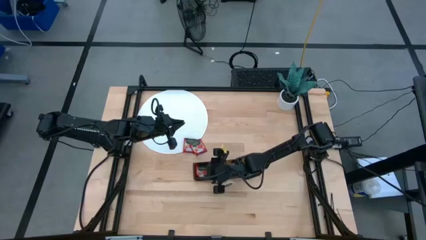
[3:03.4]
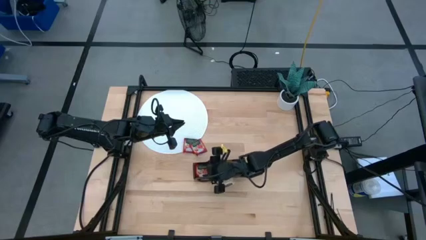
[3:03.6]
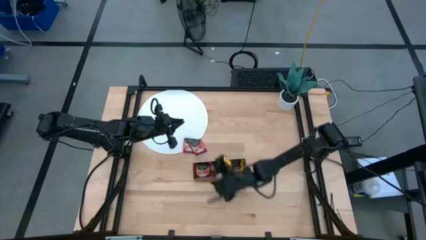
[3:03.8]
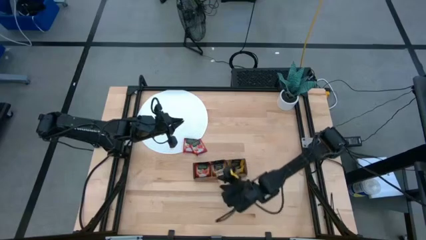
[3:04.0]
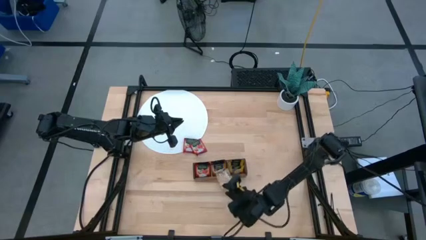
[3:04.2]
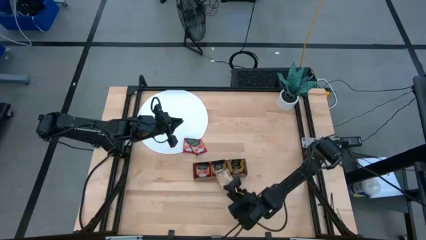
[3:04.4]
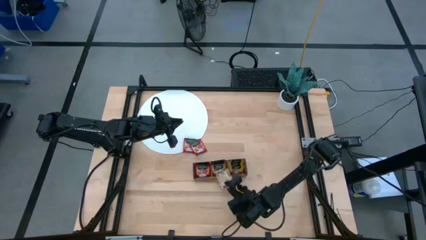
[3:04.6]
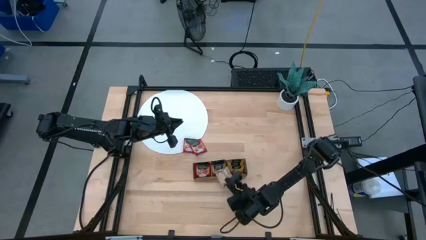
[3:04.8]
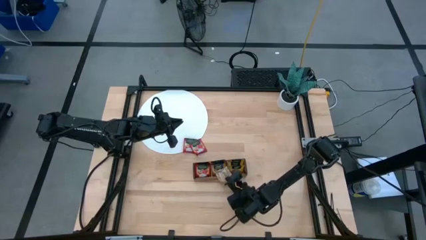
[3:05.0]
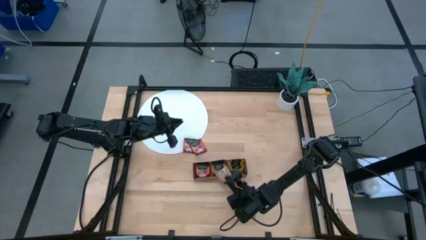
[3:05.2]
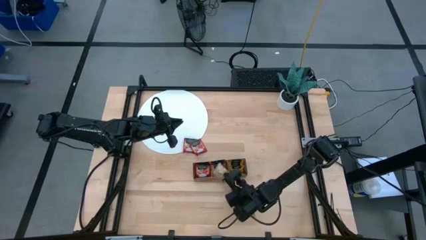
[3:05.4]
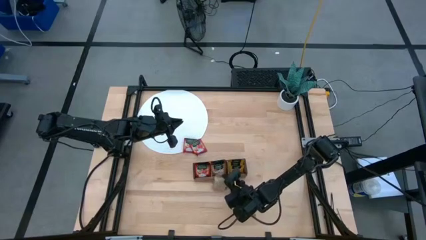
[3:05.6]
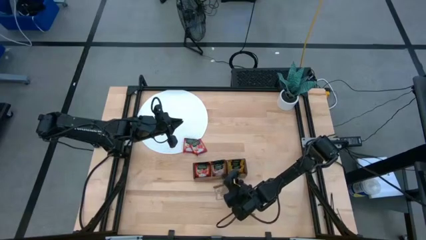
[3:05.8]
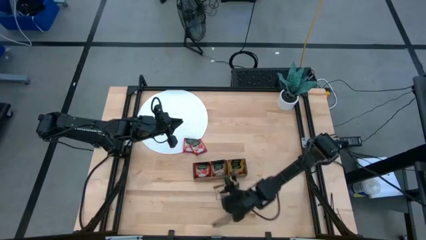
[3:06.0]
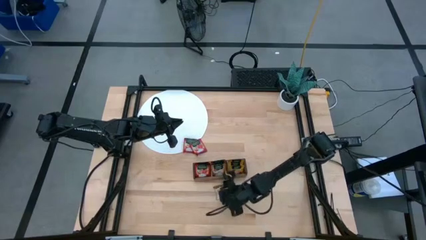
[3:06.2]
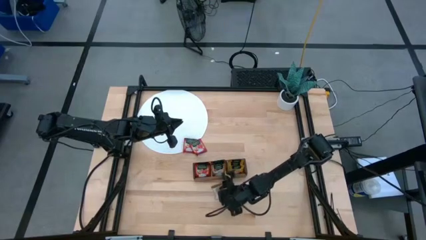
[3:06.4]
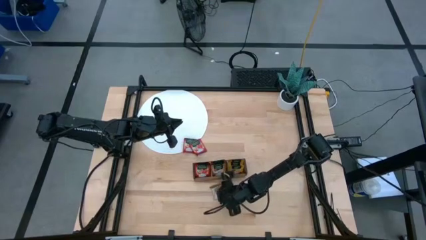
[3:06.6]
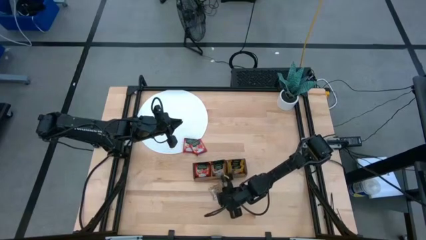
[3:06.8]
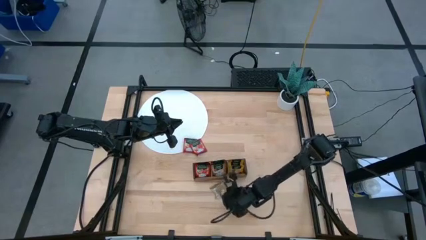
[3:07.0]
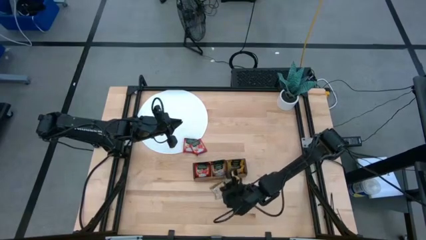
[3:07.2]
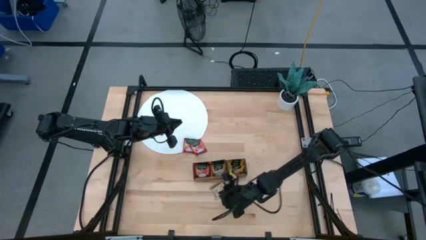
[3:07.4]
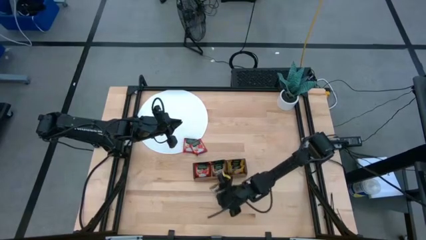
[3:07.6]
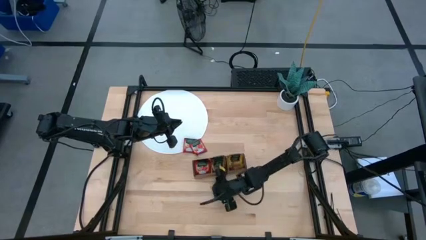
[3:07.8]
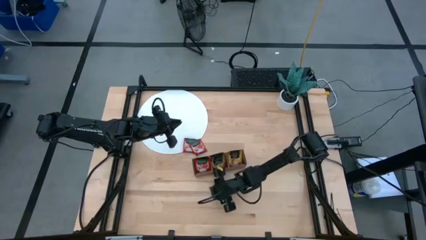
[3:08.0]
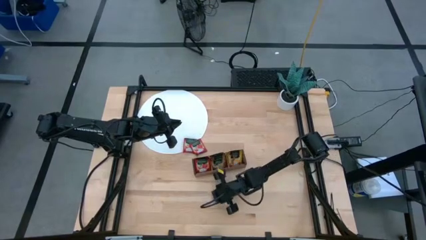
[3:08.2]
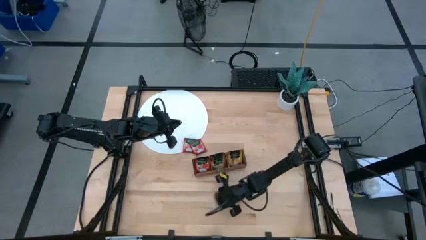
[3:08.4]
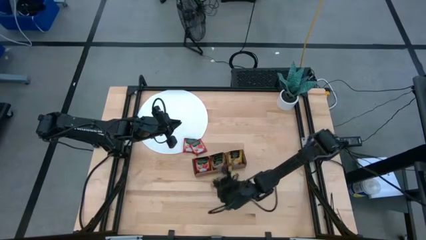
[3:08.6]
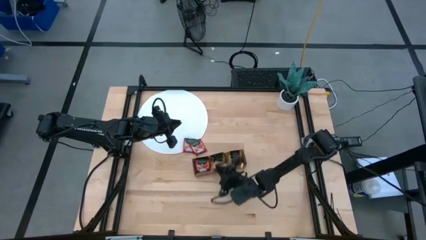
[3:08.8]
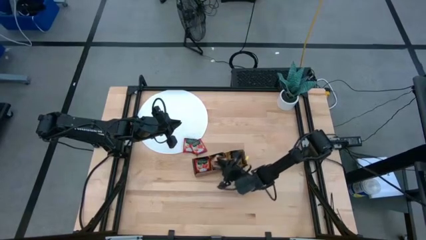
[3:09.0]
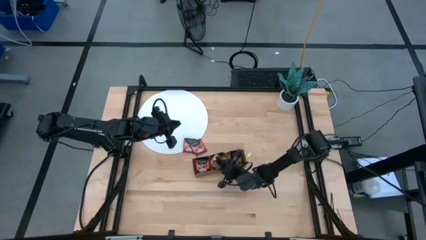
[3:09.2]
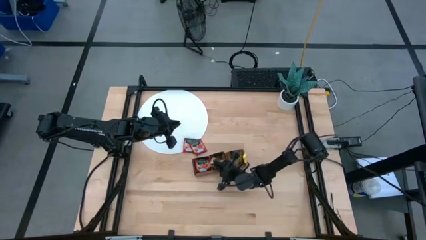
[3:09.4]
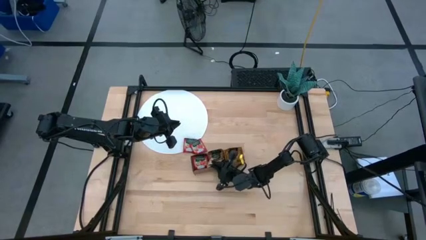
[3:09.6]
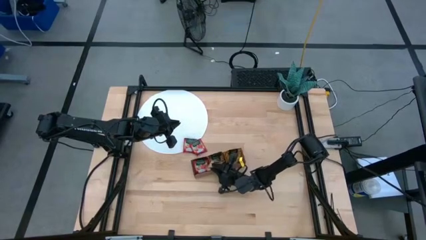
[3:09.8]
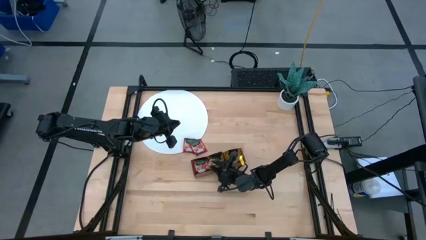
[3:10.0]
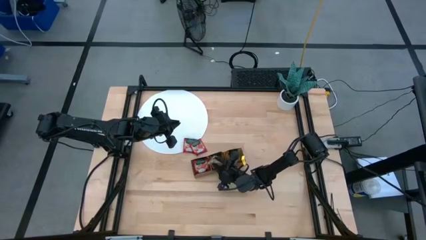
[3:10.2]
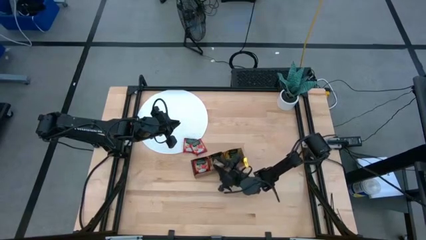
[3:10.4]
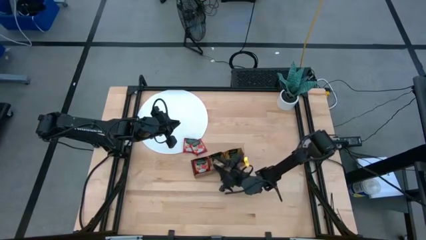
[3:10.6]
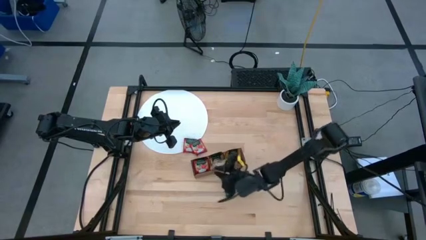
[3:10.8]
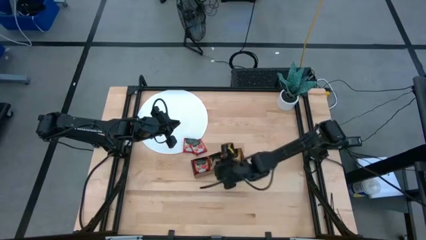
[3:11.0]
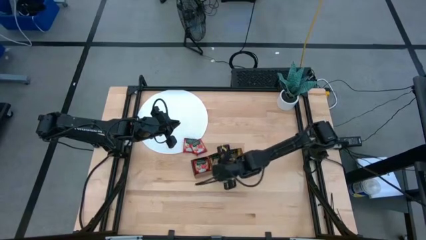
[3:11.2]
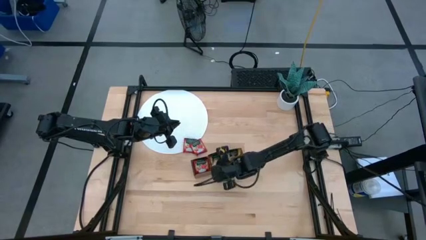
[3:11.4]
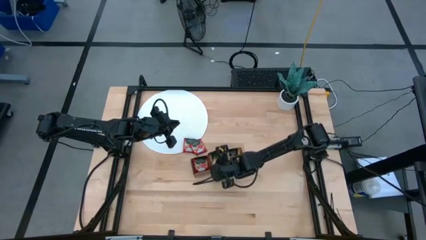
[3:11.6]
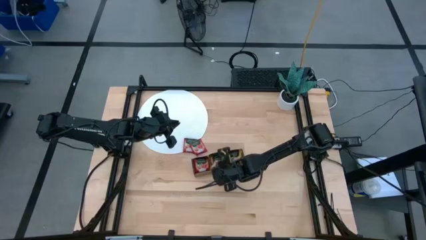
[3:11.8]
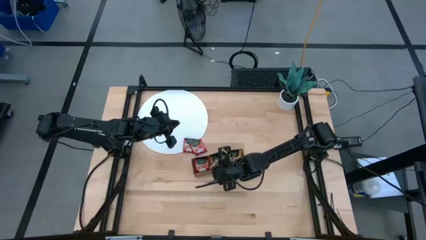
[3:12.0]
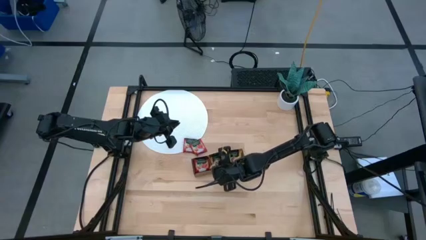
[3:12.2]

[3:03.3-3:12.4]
Task: Pick & Place Tea
Put the brown tea bag into the middle section of the wooden organizer

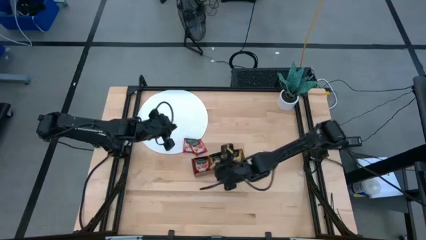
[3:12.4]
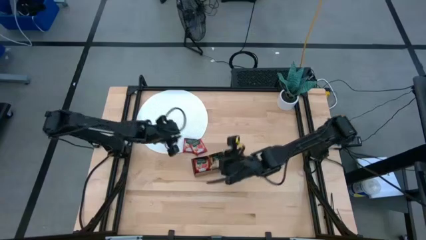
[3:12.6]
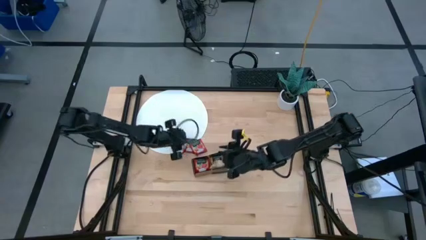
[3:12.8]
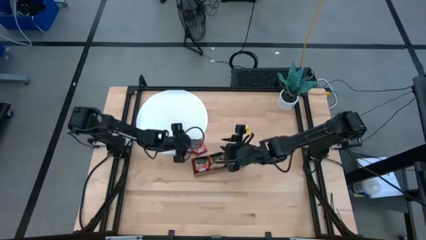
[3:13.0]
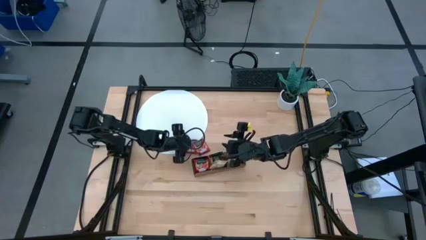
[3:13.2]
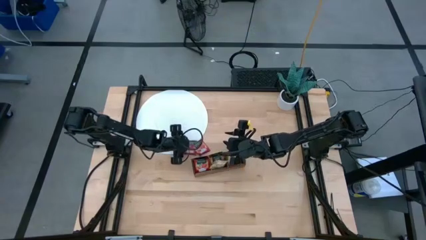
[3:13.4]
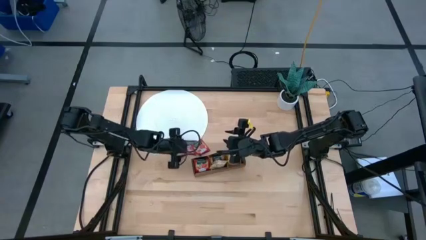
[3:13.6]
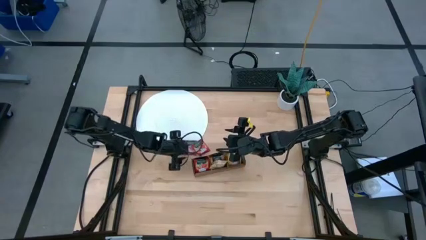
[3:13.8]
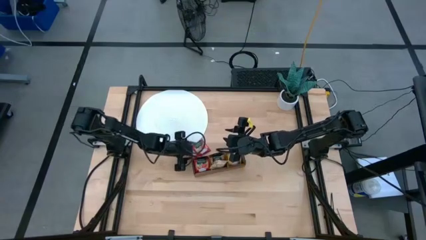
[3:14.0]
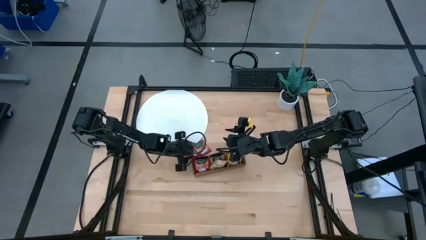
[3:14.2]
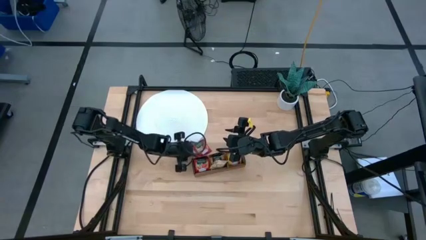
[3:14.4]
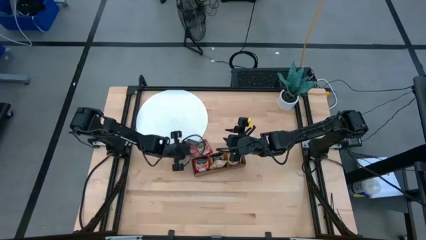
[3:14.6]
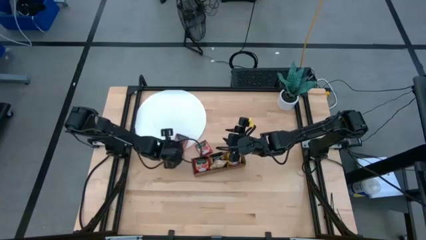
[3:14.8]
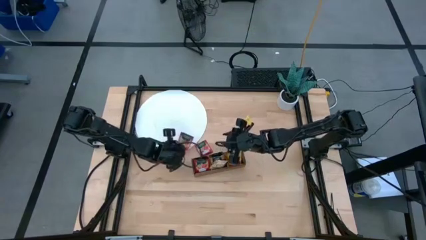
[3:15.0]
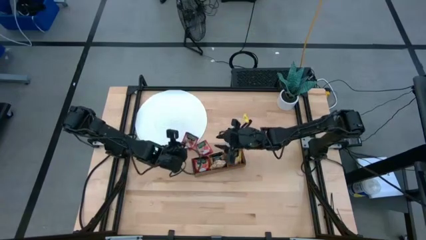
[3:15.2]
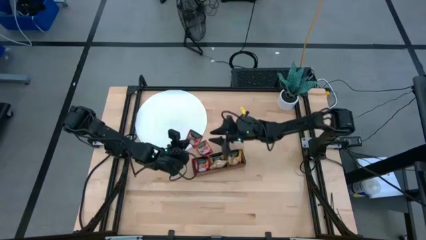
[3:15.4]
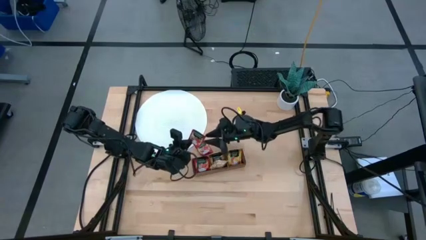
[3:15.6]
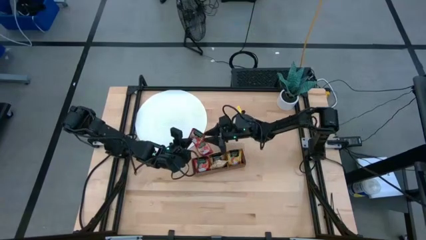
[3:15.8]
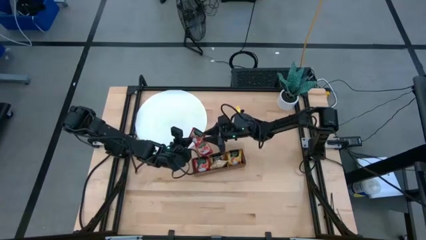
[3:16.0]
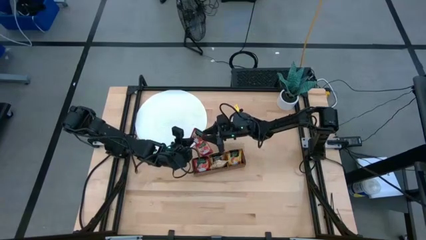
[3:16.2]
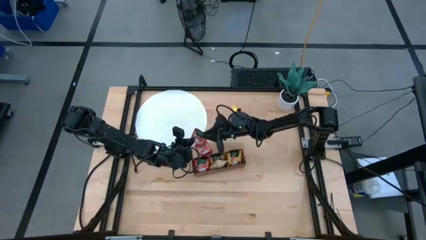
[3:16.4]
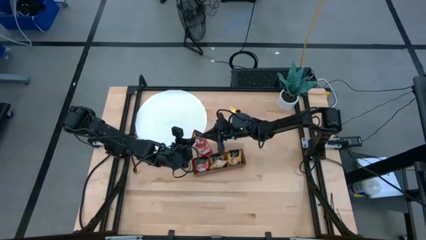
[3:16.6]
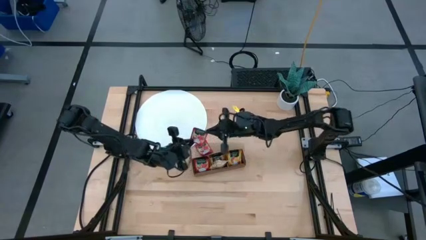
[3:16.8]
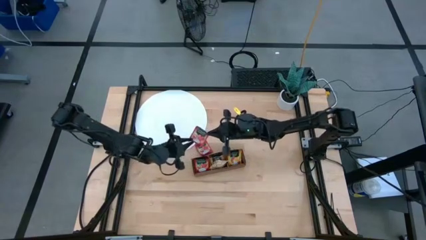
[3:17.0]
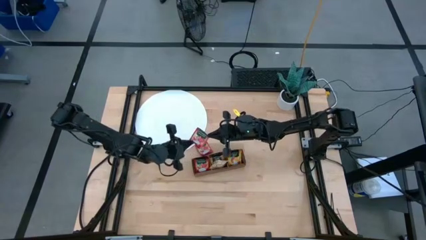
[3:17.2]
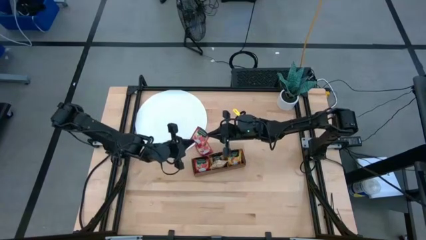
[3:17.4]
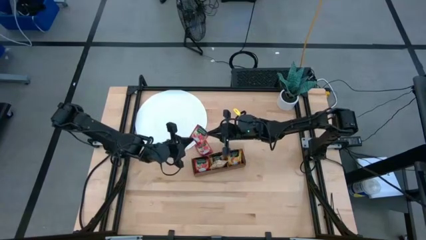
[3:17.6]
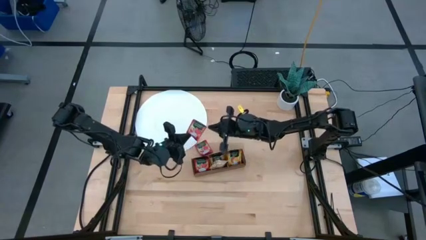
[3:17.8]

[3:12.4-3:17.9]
Put the red tea bag into the left section of the wooden organizer
